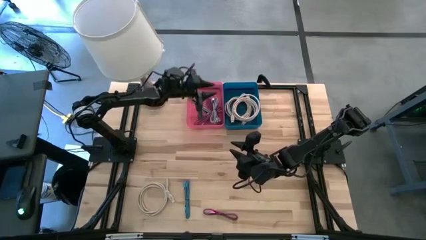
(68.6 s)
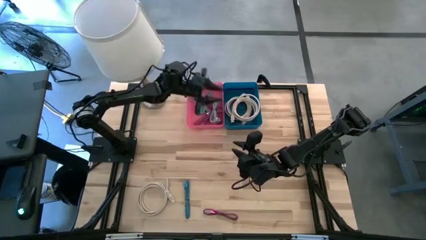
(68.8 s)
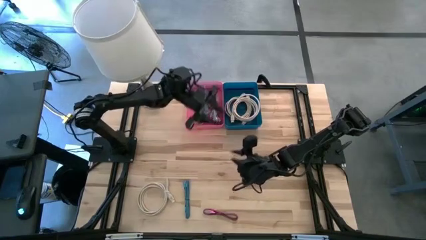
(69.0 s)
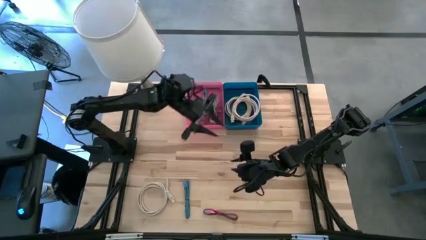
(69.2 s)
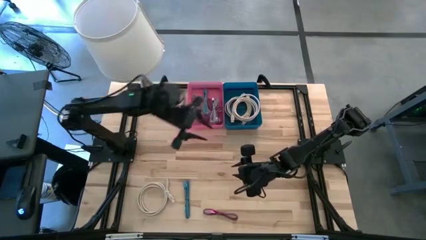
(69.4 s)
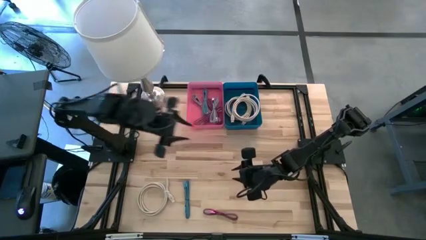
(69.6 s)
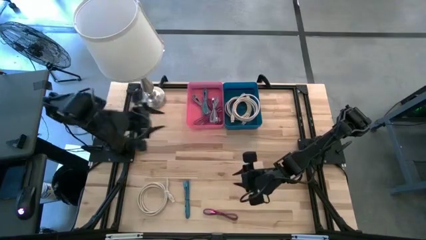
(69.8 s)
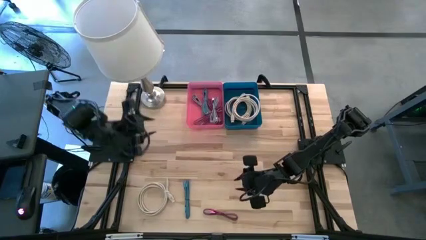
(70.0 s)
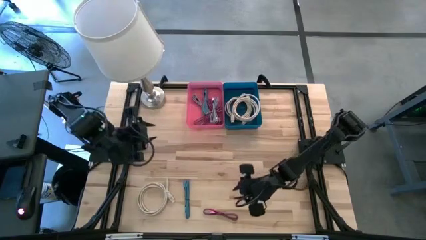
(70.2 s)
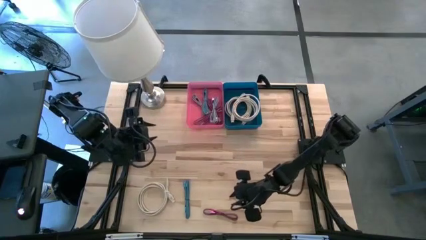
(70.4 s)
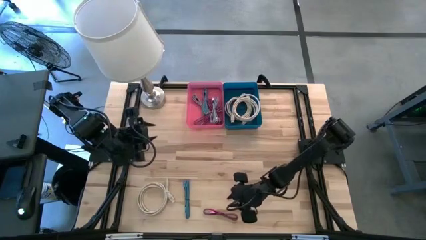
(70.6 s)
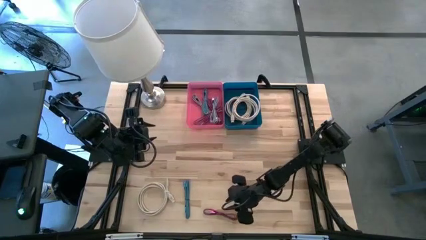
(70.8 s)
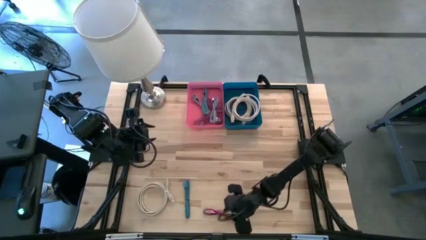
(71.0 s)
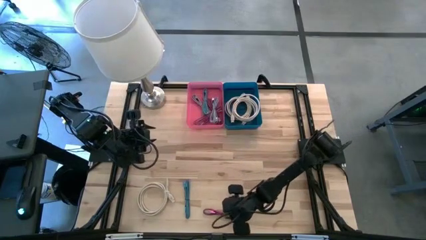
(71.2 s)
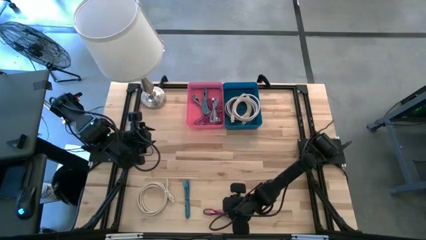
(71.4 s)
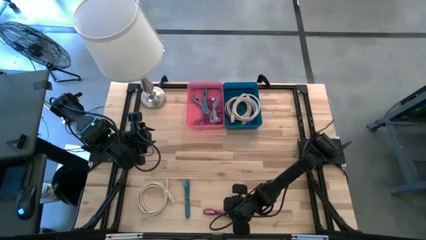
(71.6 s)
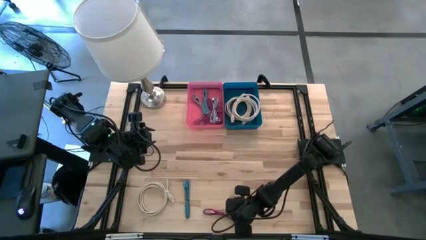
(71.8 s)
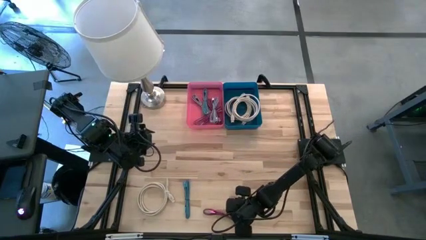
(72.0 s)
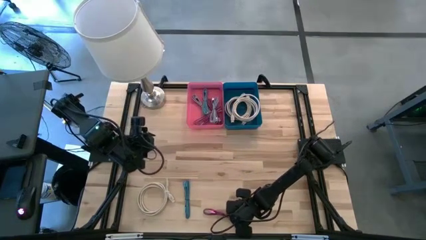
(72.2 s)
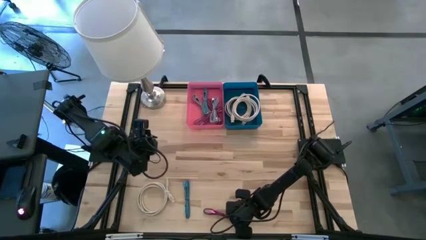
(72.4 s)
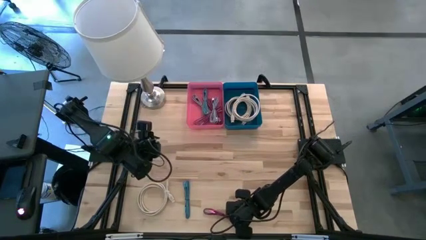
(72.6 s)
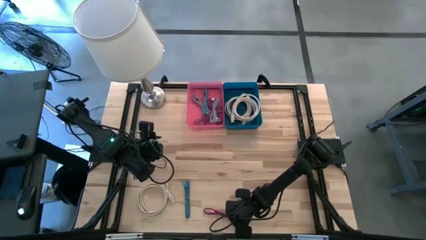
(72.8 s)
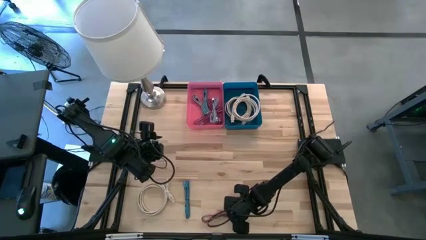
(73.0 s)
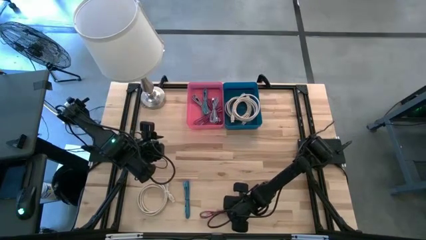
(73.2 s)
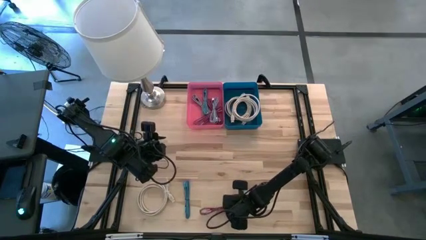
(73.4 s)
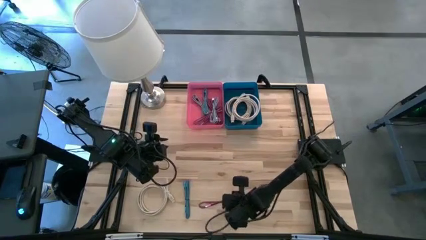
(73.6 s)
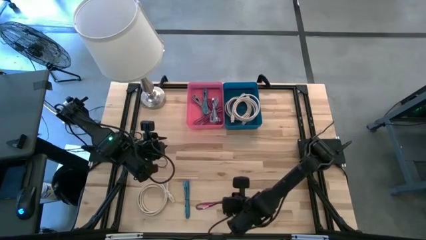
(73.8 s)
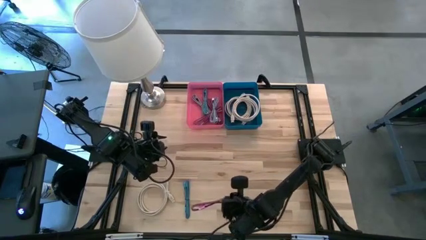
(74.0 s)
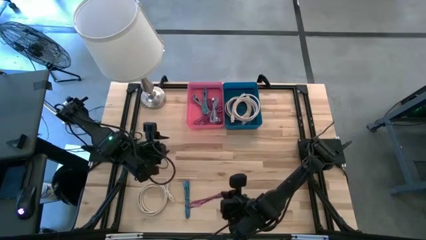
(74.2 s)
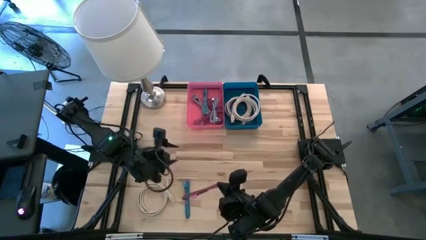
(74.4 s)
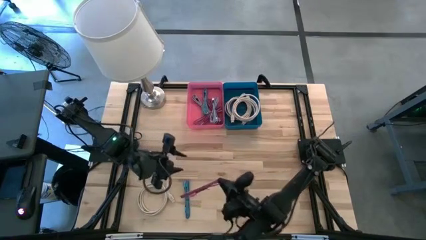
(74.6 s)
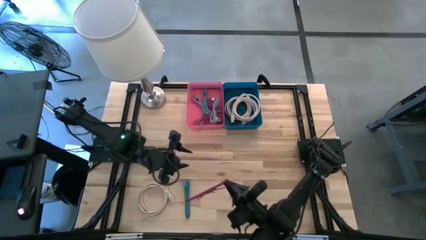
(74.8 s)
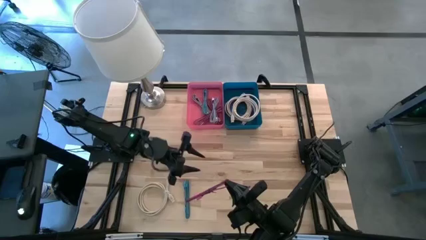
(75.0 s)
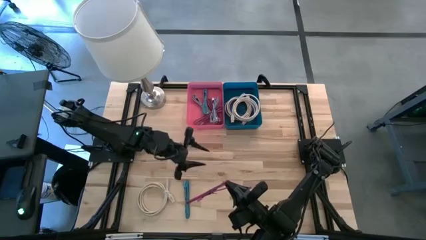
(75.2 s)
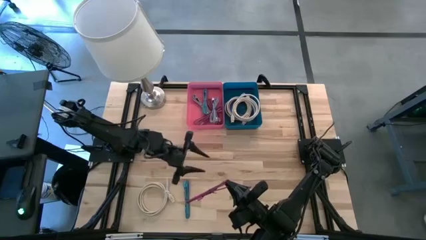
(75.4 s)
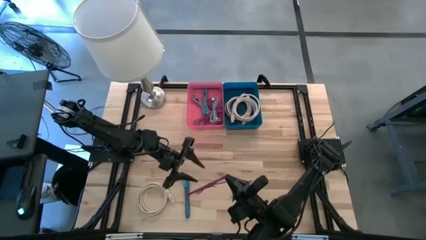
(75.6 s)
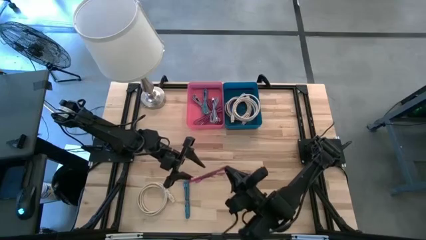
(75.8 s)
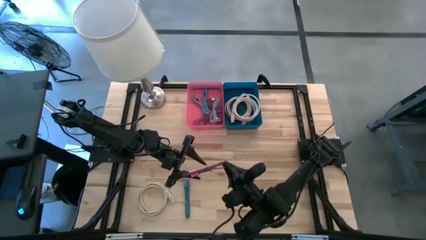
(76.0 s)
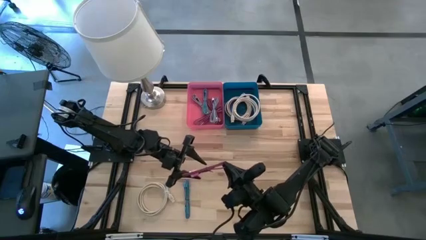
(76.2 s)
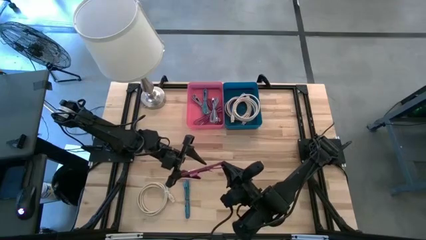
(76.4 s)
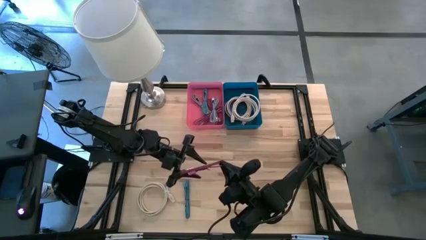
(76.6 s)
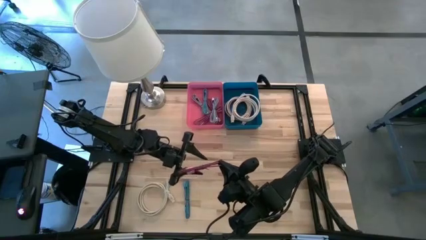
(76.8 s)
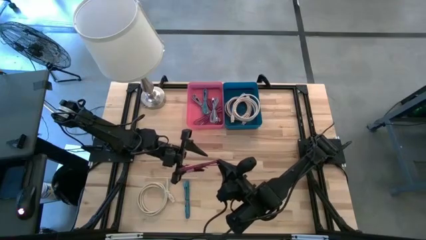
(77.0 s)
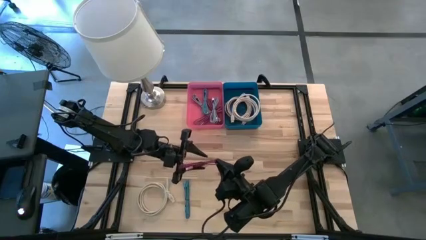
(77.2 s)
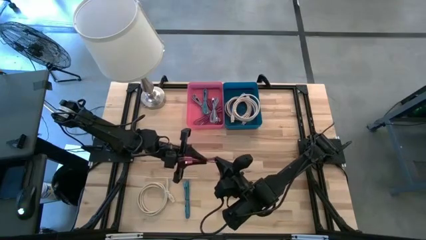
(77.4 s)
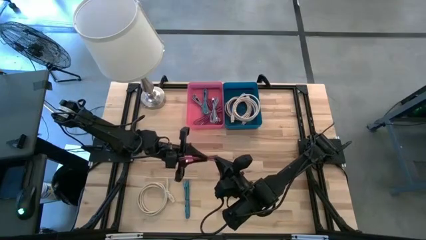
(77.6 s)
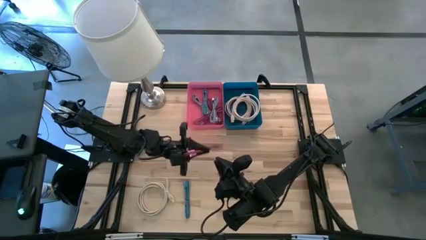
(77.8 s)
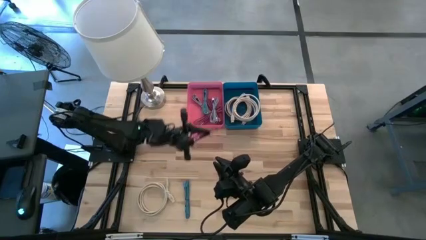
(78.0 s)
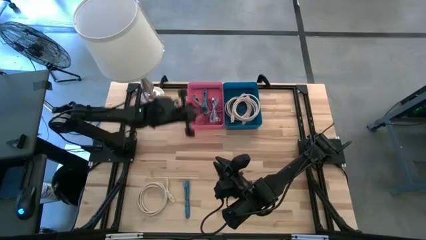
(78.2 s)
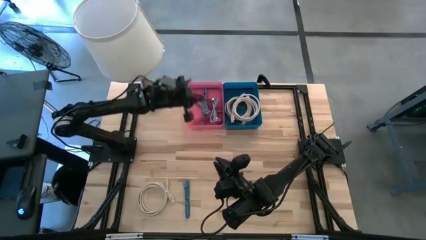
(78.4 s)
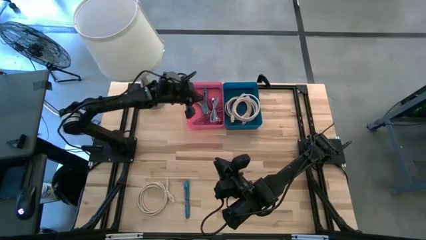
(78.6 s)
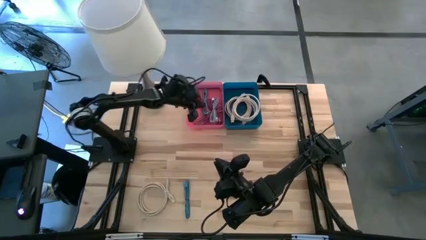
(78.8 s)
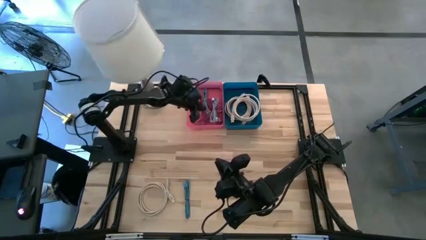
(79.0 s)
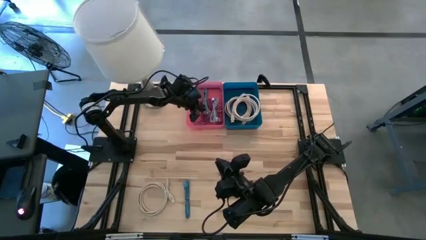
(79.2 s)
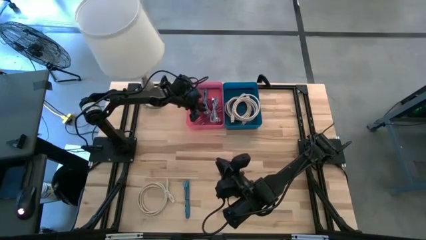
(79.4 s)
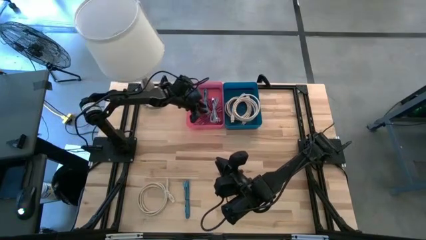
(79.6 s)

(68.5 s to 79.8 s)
Task: Pick & Place USB Port
Put the pink charger cable into the pink bin

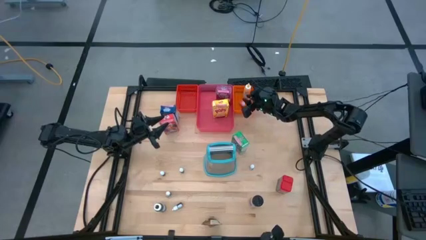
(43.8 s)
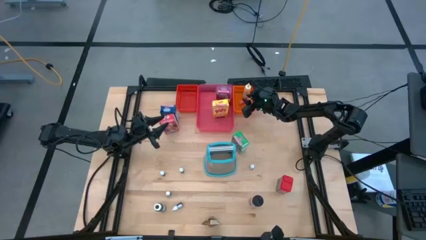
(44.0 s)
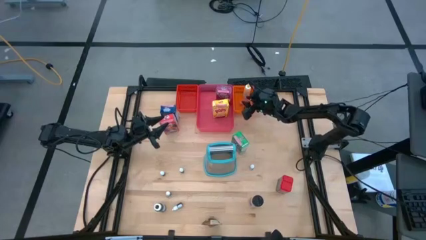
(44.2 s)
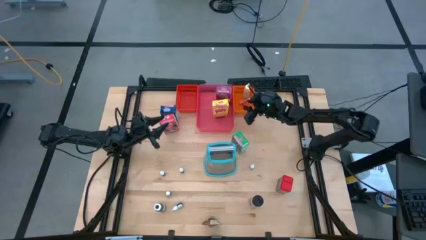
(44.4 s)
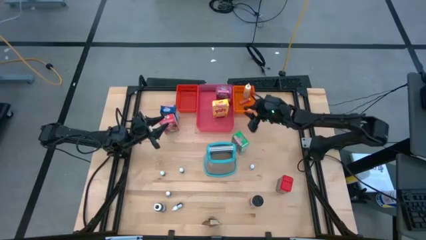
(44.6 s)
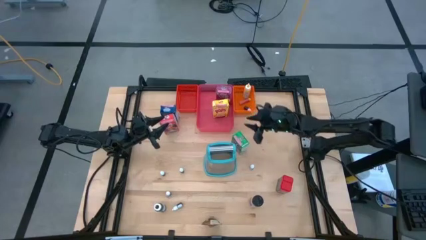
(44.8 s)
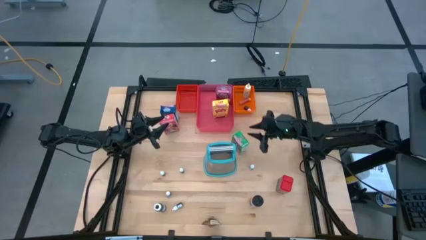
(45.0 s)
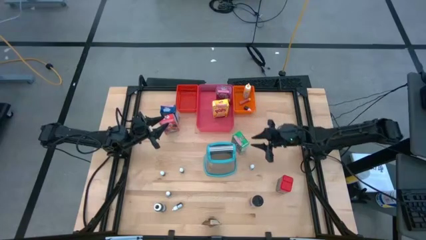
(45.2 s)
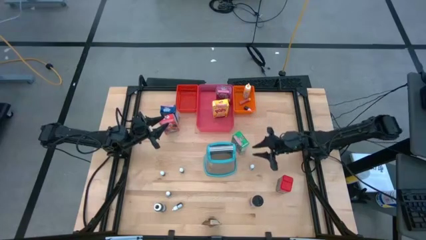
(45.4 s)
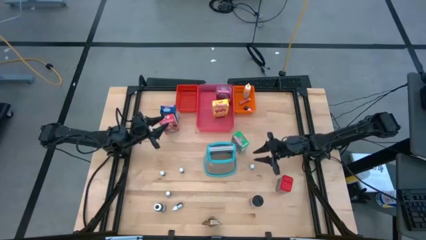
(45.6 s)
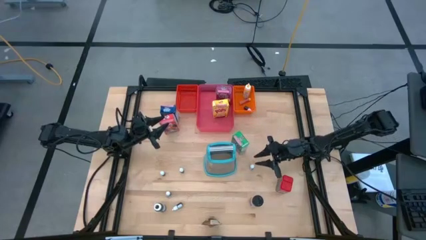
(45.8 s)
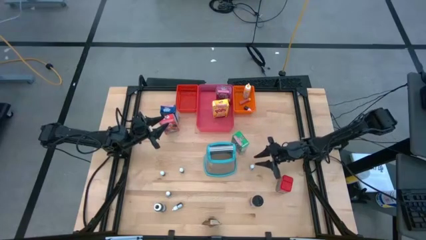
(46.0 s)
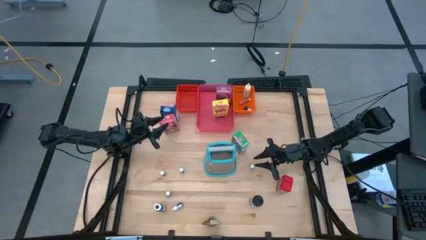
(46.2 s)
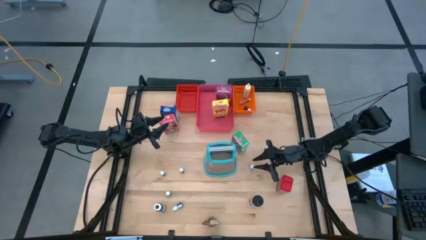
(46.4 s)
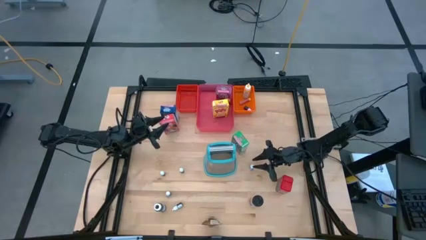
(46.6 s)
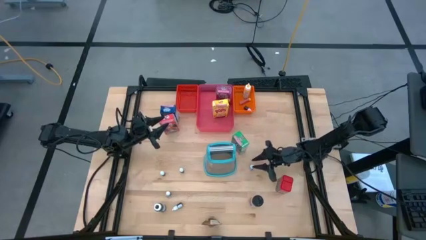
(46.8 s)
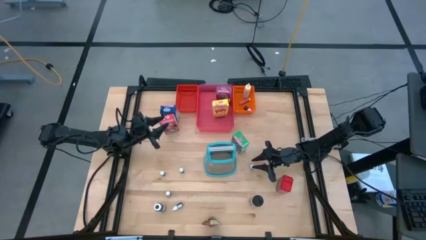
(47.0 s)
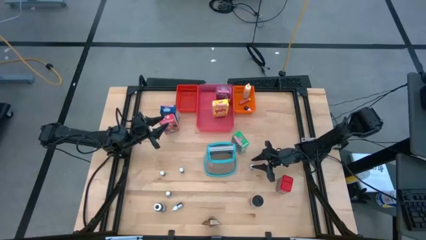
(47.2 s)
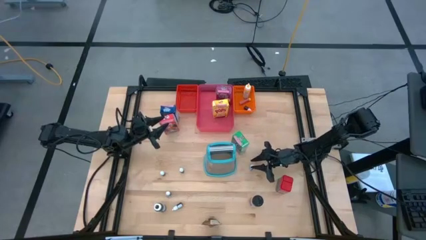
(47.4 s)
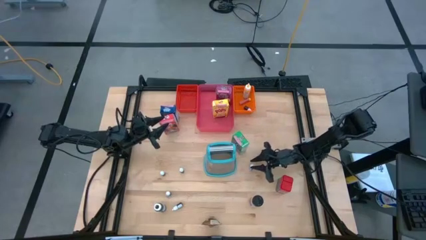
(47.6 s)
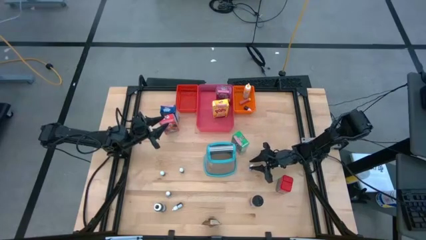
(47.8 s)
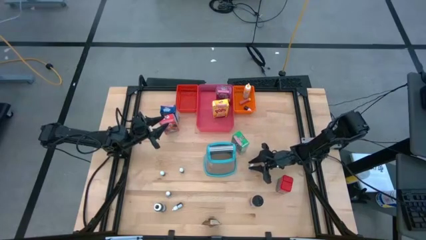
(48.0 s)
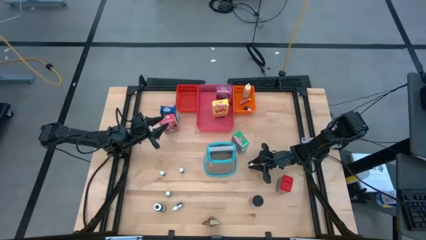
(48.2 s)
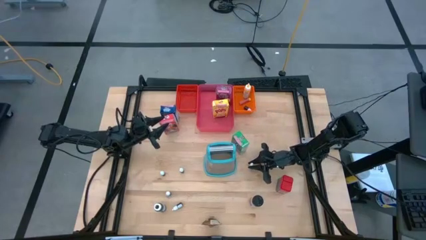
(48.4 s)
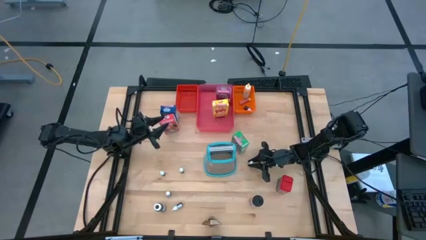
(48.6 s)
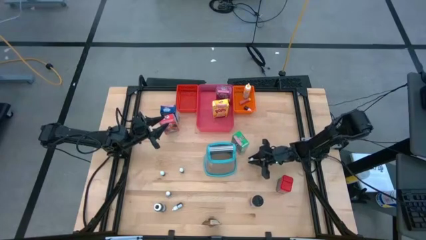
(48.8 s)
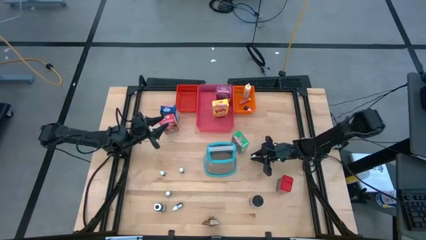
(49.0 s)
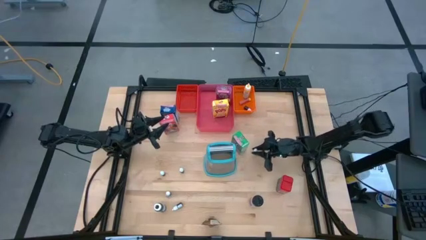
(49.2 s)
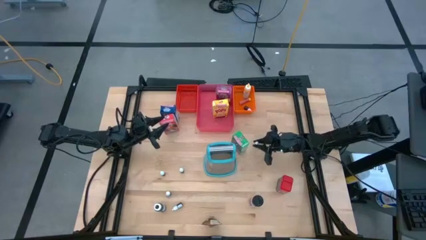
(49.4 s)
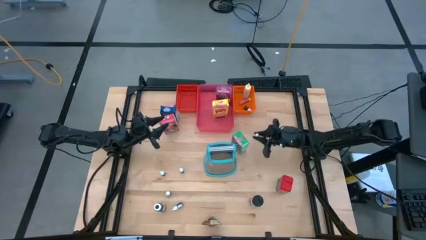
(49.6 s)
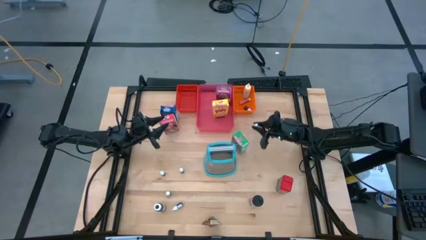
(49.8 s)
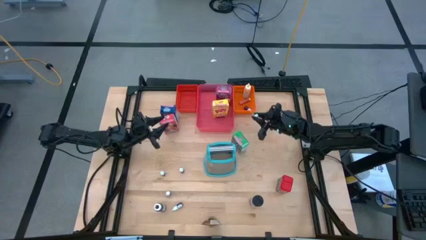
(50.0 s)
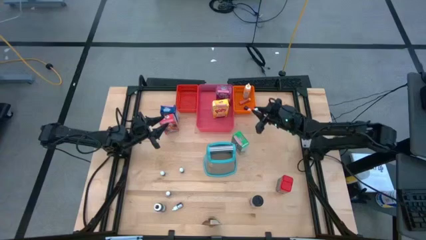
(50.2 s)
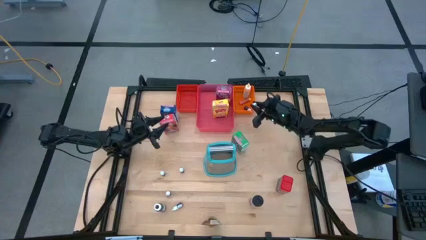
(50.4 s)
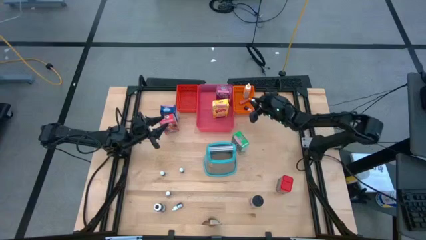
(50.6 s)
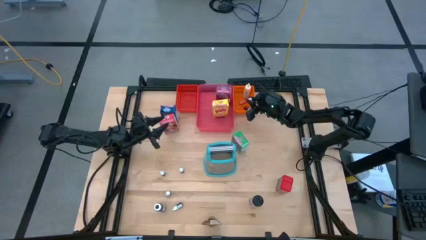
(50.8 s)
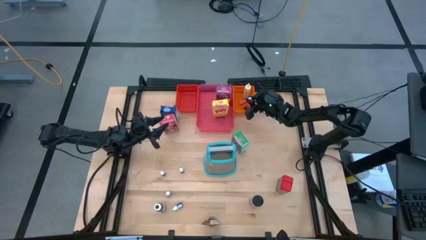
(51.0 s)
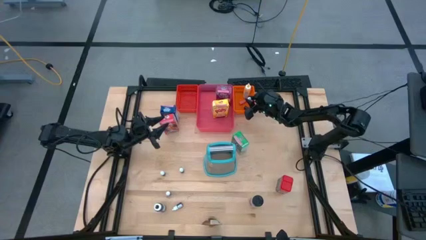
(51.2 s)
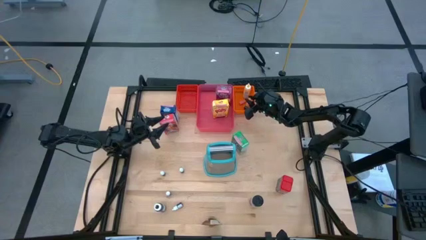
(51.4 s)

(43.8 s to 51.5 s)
Task: Pick & Place Kitchen Items
Put the small purple food coloring bottle into the orange bin
